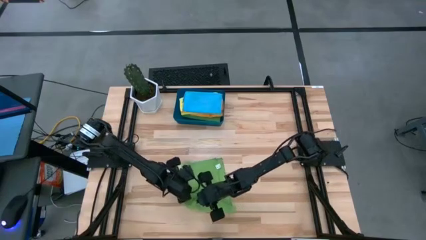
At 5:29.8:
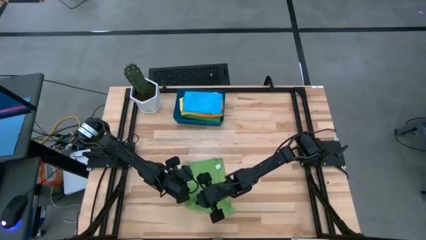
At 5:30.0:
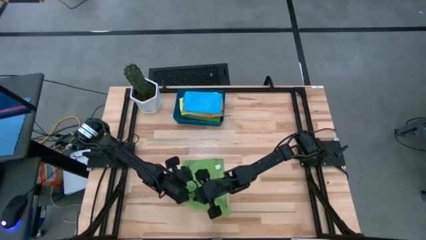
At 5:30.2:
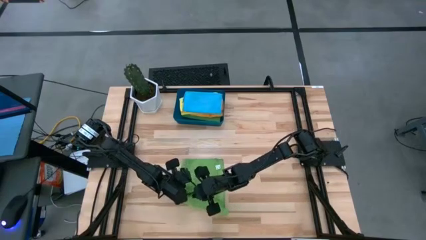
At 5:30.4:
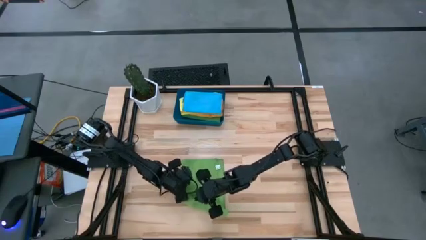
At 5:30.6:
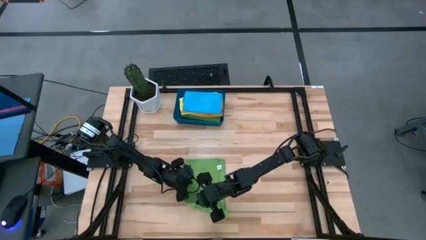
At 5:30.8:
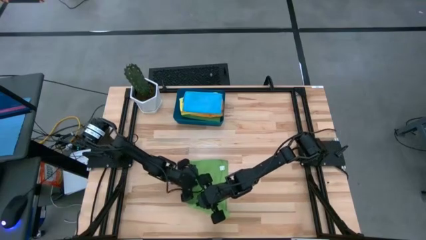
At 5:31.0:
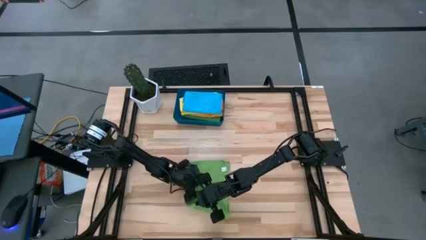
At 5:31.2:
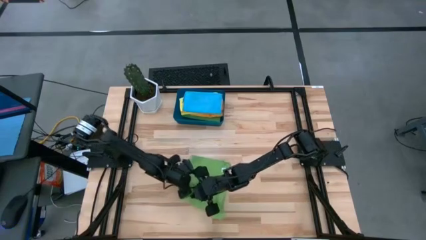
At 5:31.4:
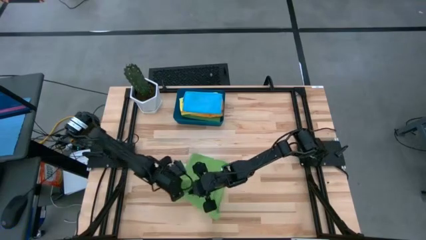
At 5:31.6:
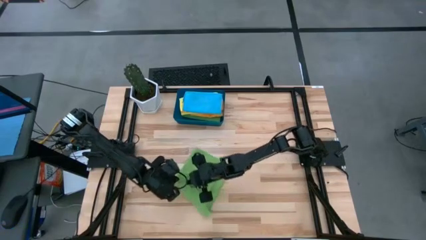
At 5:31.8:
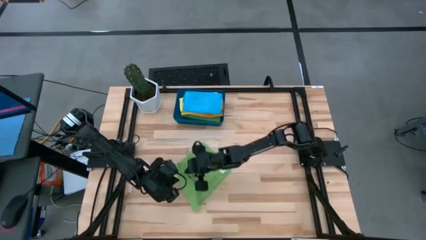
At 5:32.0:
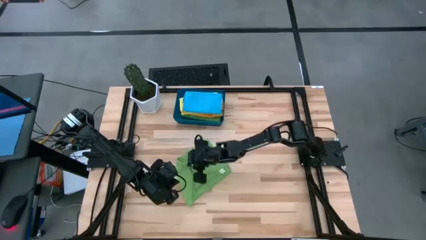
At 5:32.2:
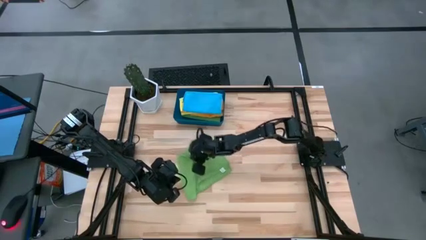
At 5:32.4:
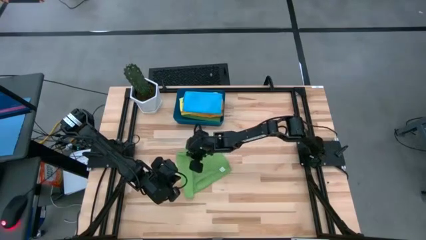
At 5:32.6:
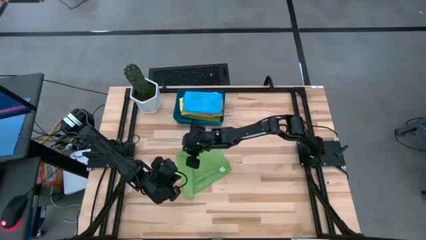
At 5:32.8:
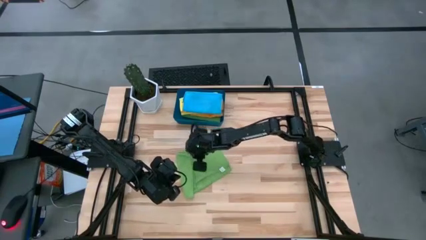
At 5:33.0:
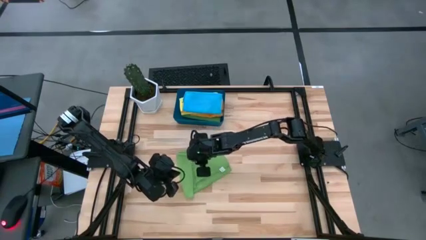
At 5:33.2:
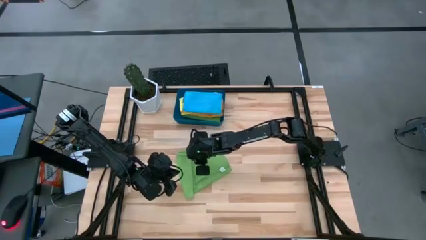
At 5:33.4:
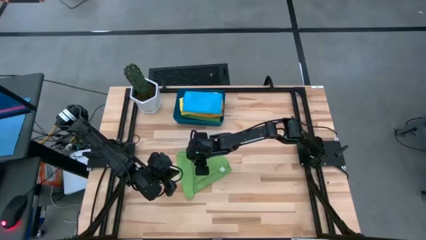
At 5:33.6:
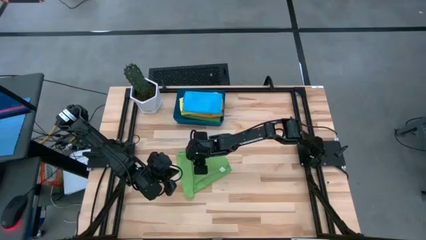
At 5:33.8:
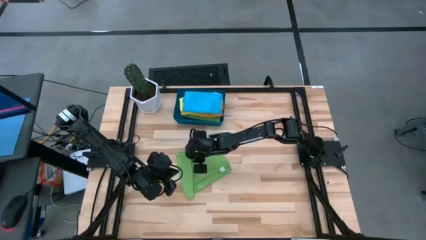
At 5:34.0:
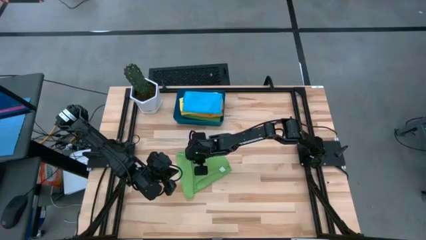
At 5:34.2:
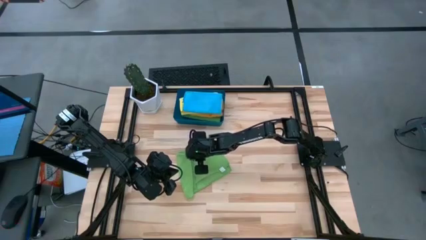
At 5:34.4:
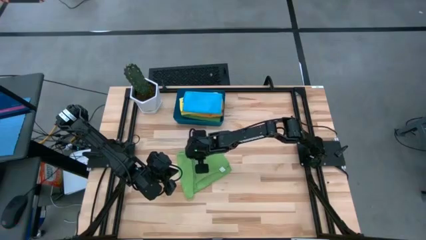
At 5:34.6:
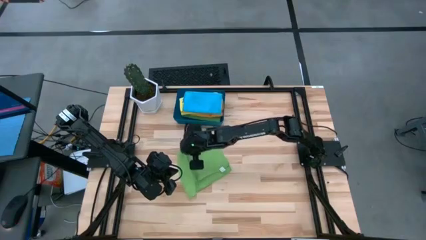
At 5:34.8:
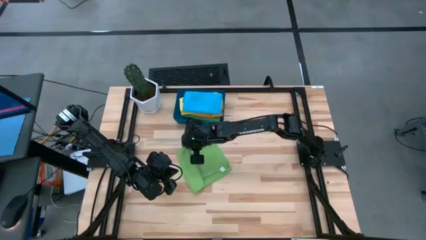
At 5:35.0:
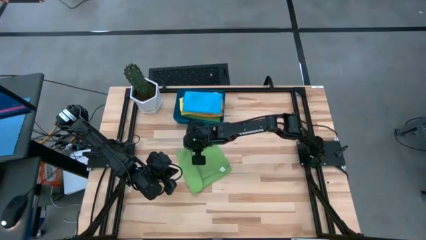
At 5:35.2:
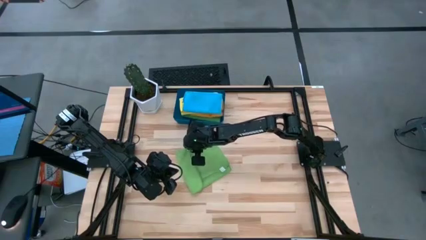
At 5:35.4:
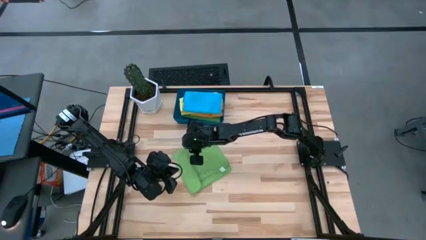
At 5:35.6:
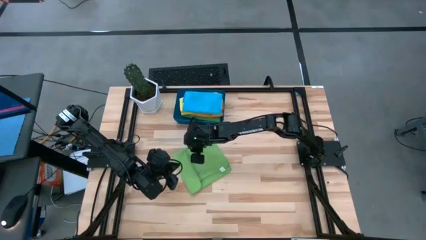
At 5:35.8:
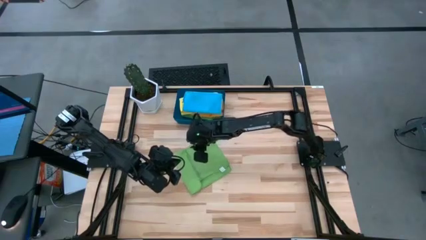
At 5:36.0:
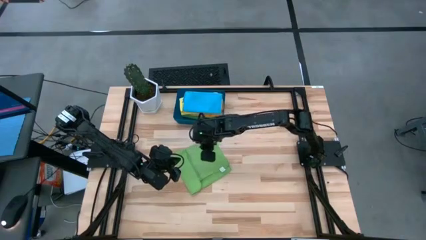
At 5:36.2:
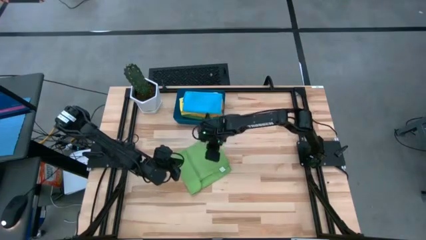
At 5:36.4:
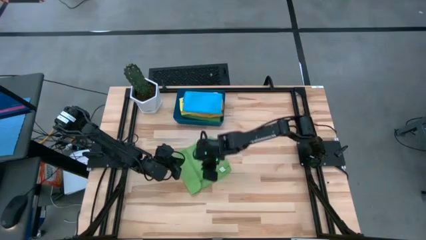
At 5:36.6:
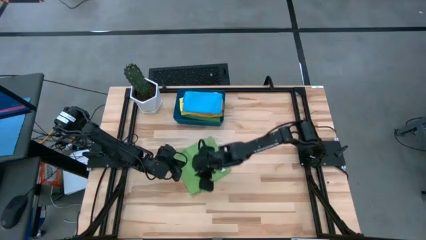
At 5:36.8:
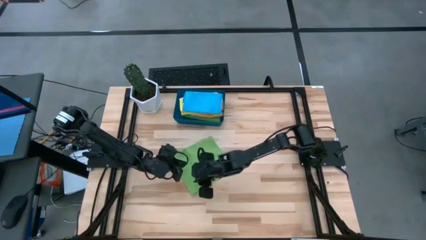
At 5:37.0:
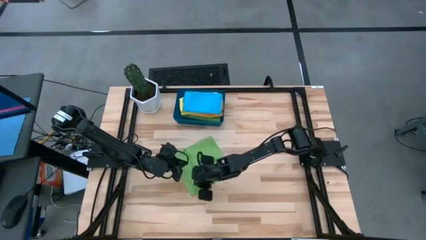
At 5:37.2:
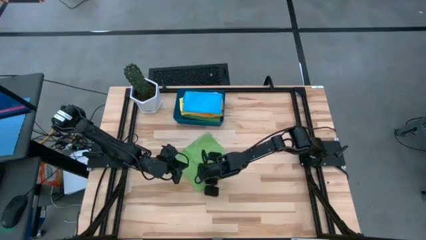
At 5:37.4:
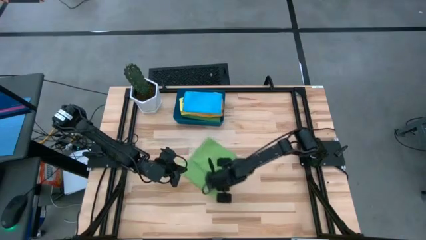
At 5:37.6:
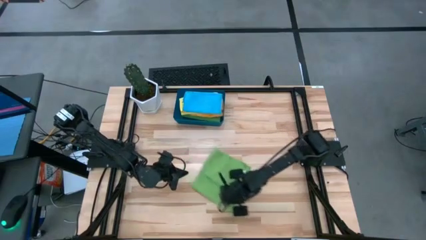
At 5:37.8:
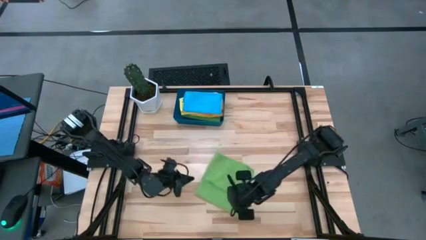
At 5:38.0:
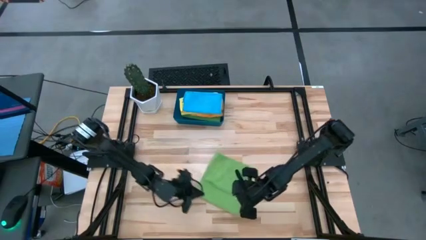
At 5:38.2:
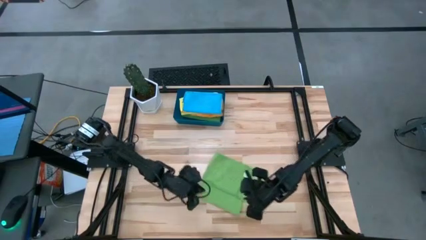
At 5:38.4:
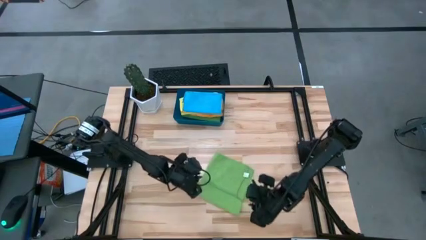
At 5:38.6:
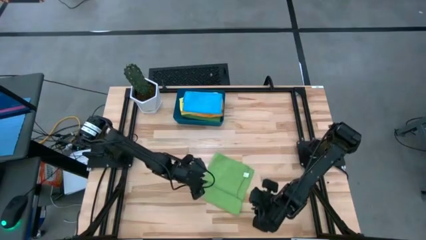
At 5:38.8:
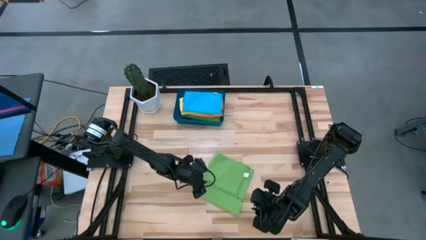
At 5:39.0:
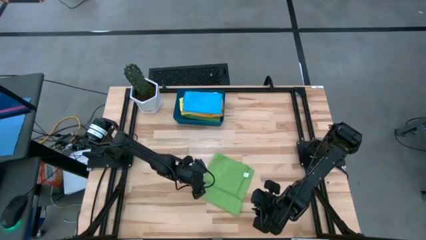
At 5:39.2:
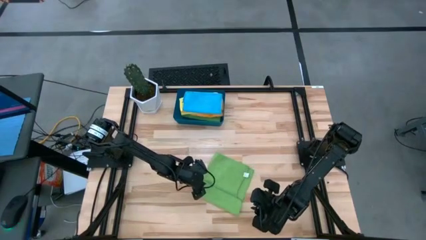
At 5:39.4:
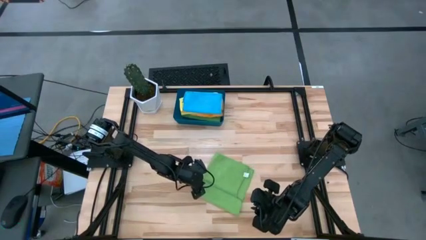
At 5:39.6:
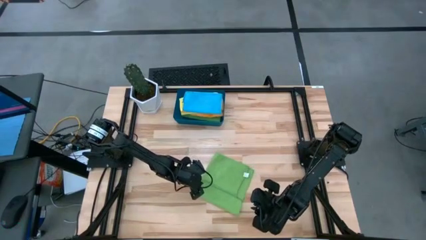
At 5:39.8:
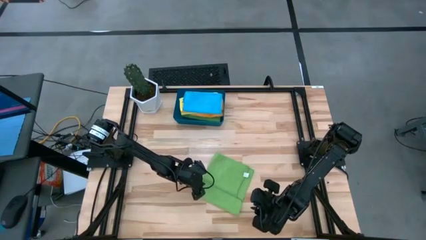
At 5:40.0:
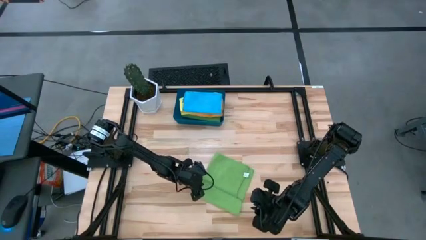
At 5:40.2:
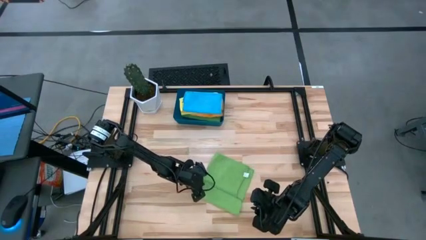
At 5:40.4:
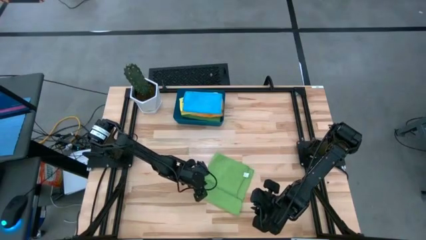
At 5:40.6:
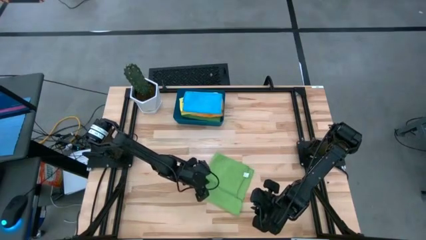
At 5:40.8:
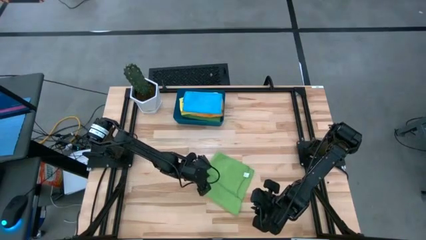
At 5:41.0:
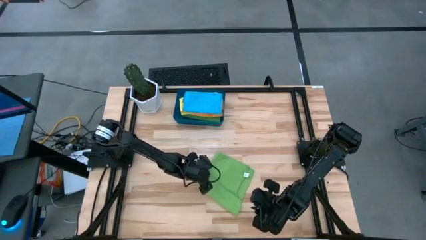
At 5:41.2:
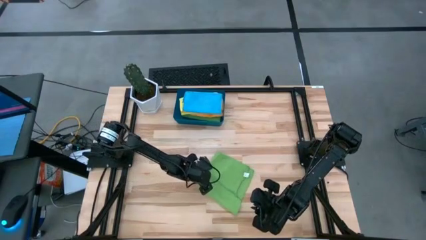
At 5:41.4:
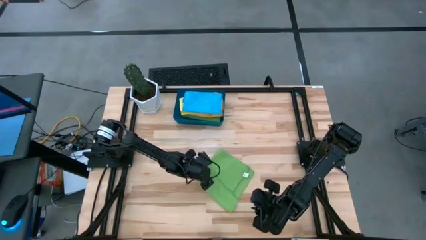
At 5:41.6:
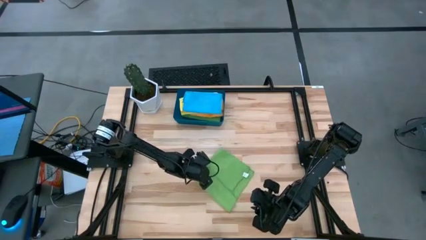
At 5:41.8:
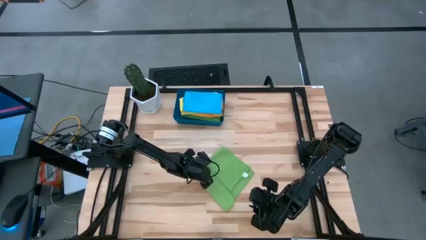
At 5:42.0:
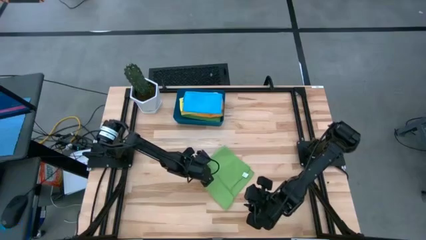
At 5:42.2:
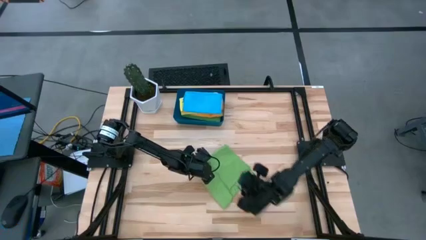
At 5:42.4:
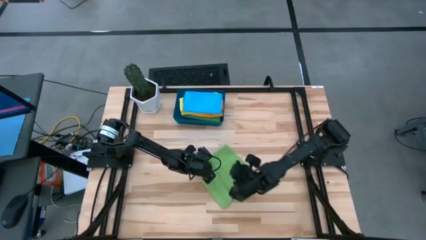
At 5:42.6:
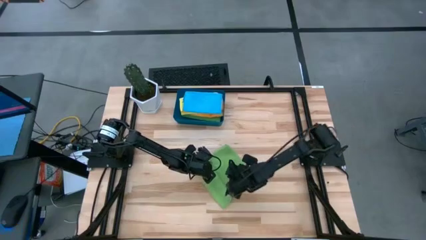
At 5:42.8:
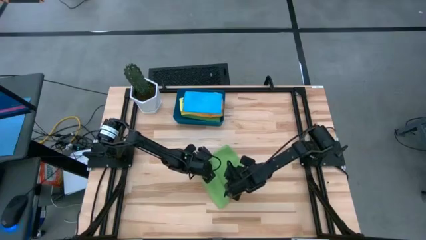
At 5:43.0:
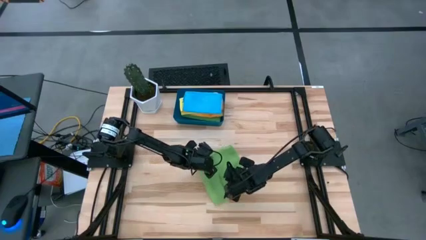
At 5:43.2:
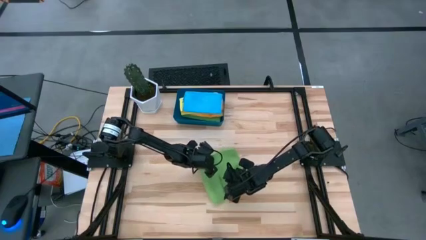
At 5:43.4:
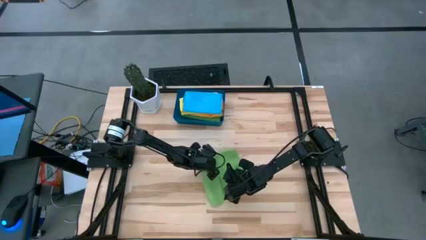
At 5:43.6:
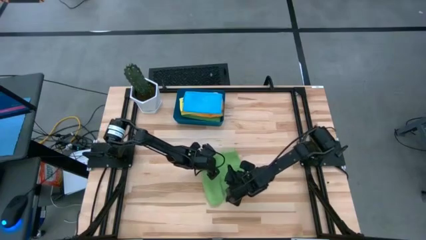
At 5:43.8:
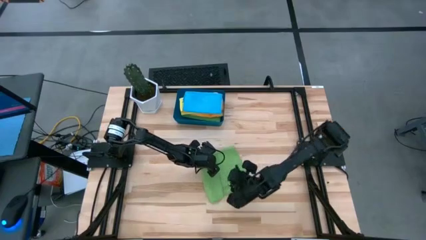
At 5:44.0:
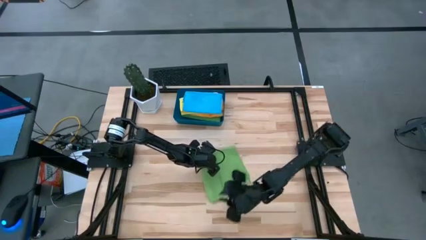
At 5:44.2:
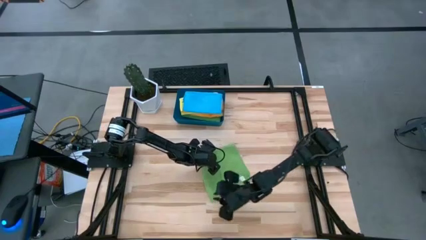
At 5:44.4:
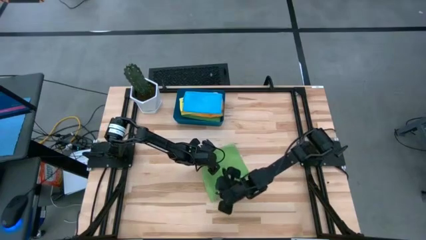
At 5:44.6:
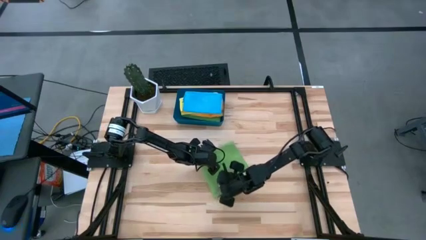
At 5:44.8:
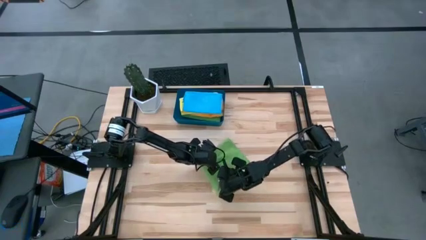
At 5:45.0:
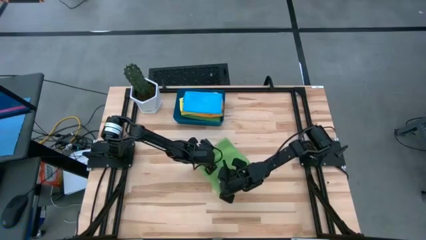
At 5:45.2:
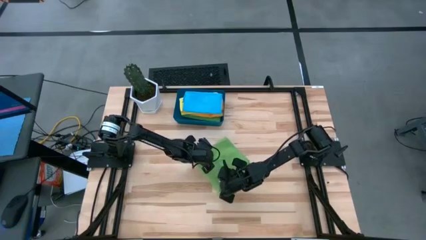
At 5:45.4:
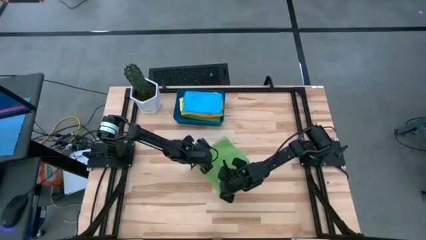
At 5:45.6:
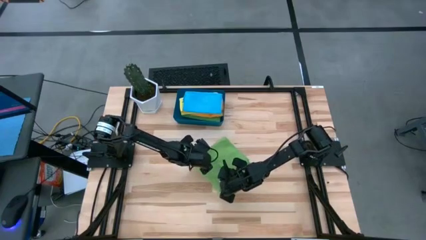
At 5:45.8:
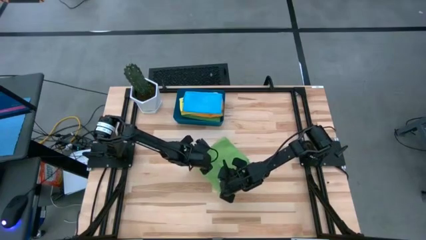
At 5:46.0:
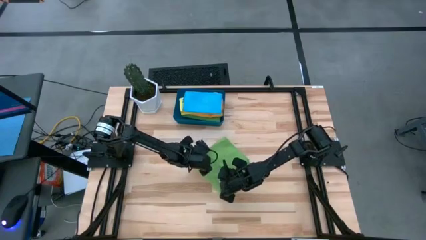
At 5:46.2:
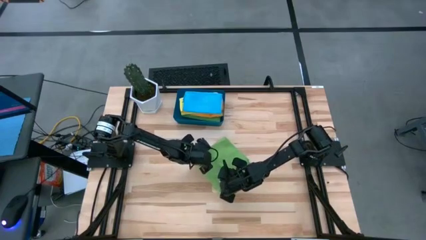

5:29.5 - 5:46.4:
Task: Fold microfiber towels
Fold the green towel
